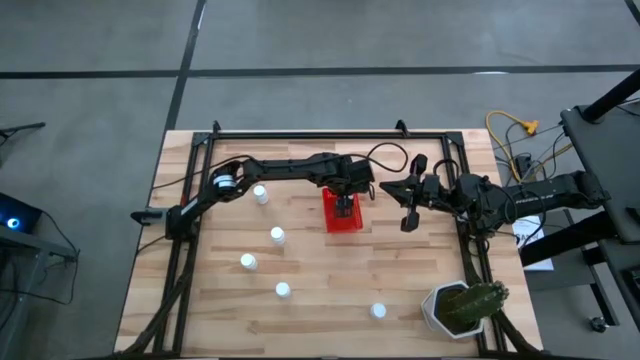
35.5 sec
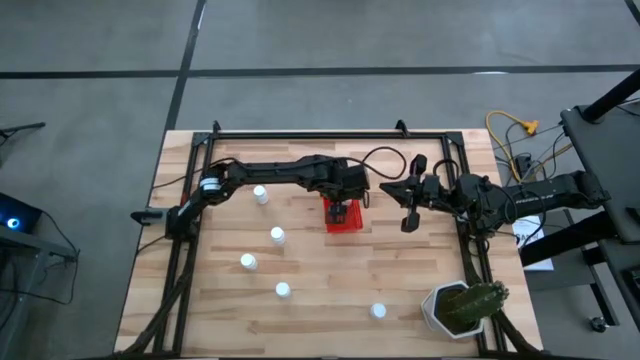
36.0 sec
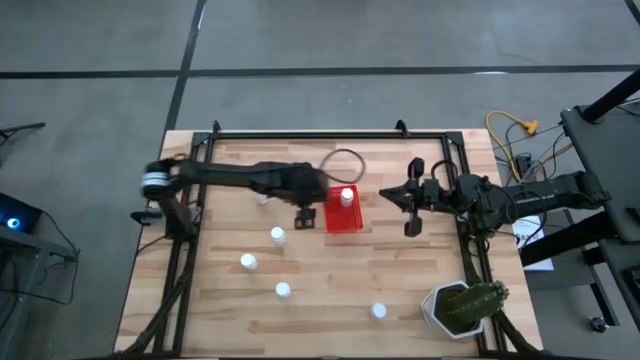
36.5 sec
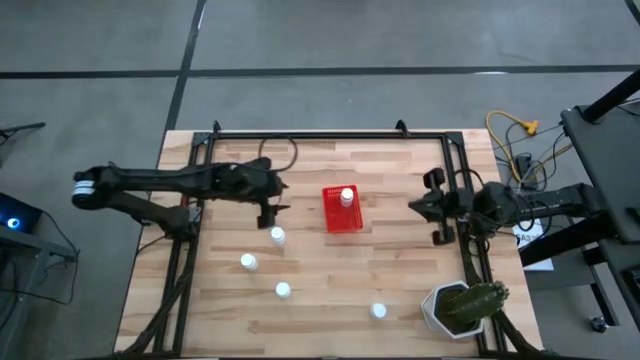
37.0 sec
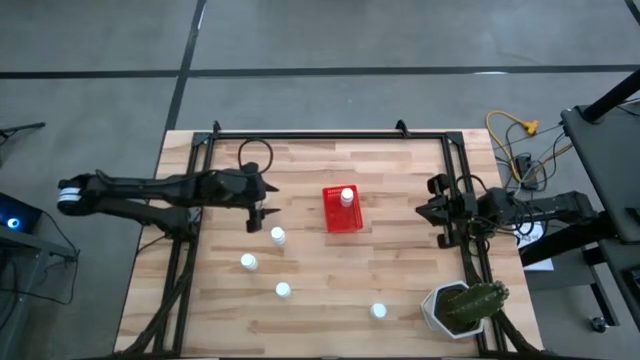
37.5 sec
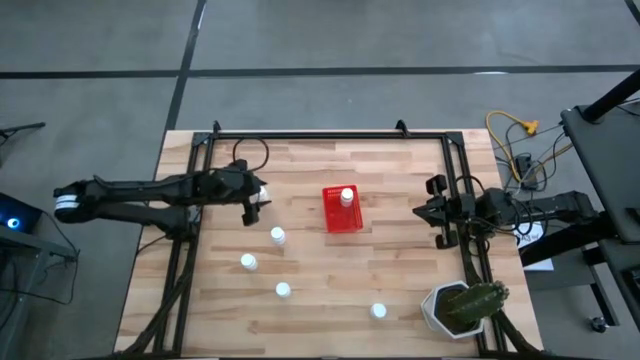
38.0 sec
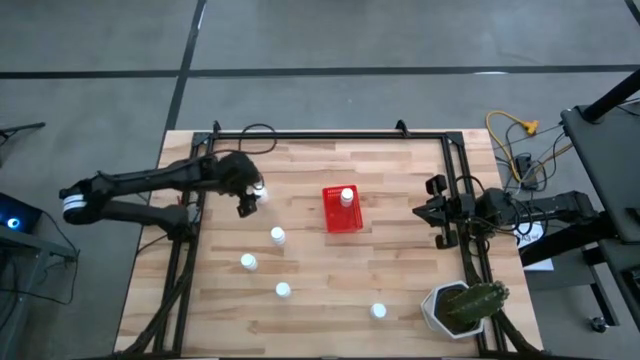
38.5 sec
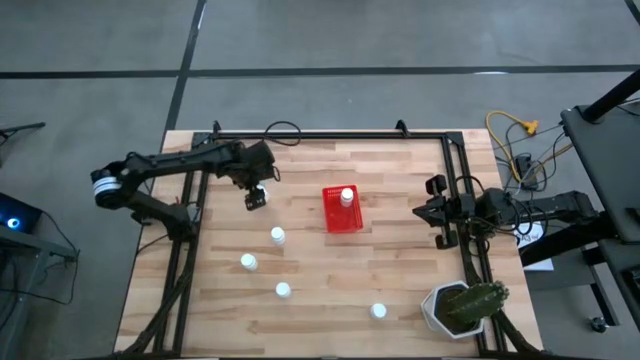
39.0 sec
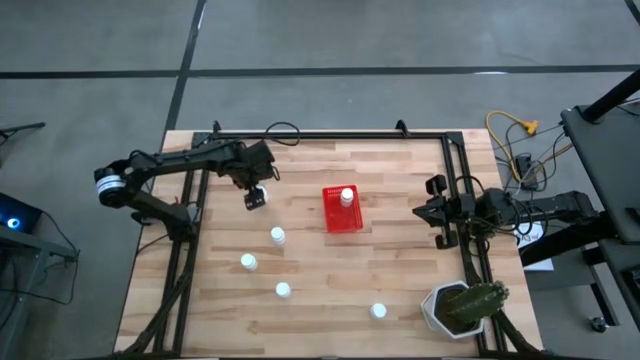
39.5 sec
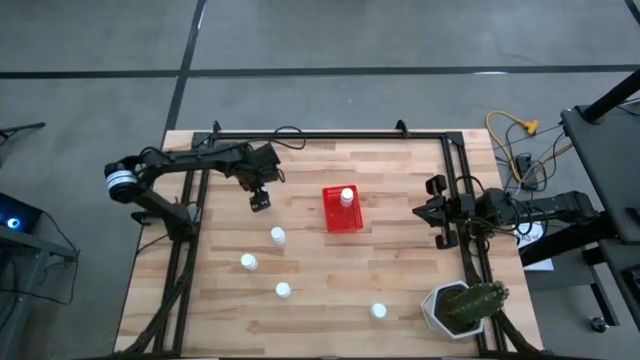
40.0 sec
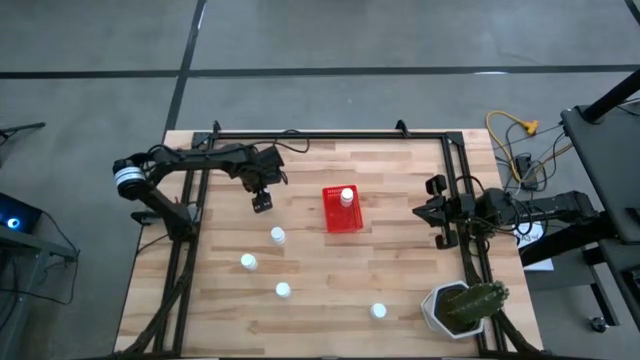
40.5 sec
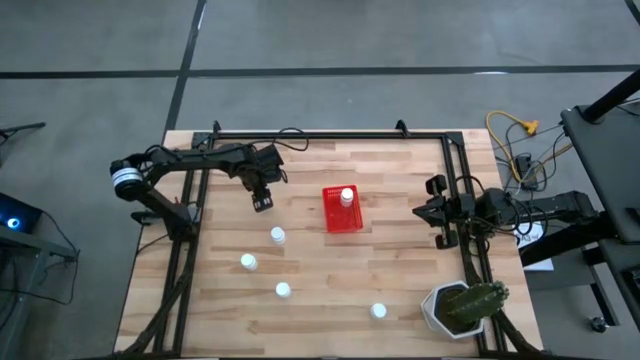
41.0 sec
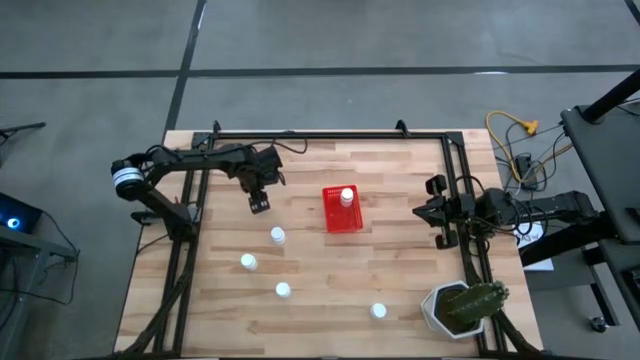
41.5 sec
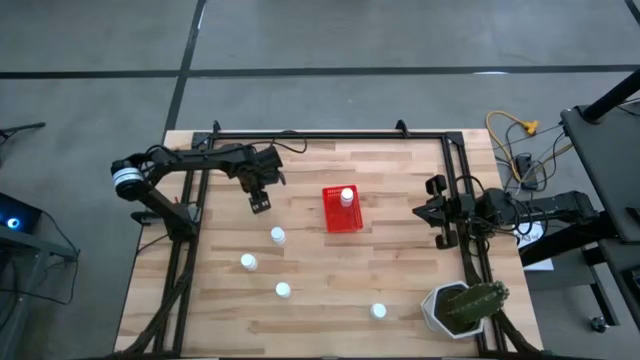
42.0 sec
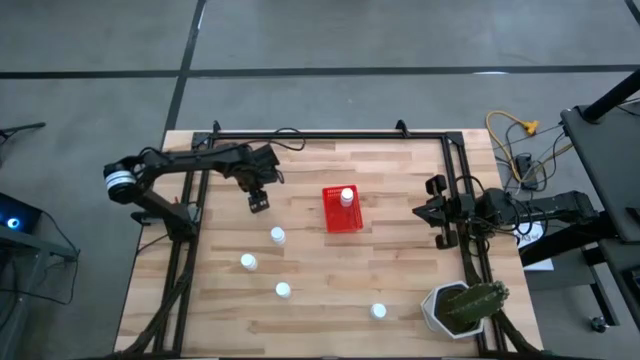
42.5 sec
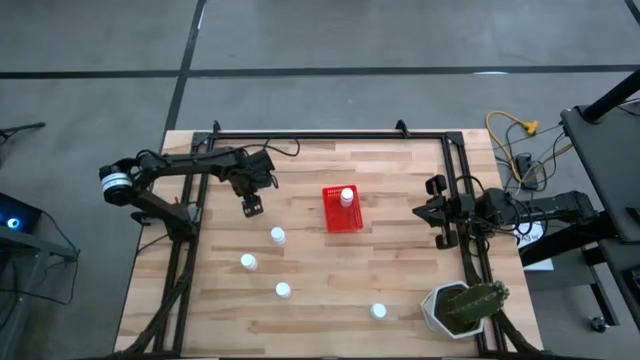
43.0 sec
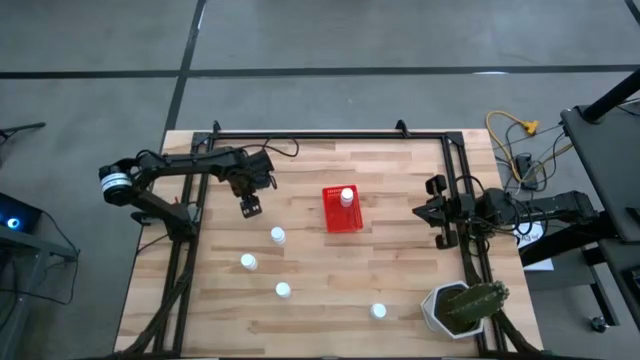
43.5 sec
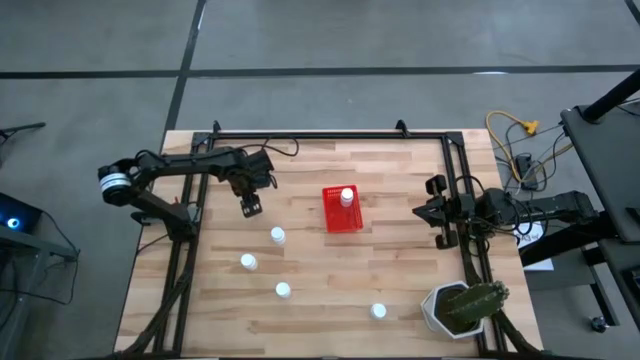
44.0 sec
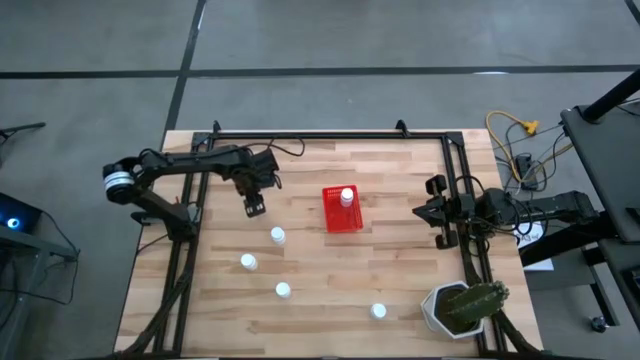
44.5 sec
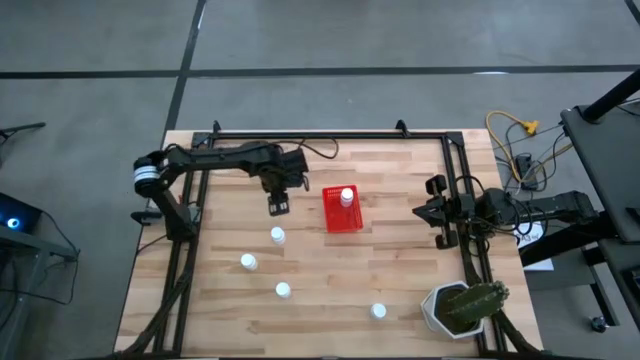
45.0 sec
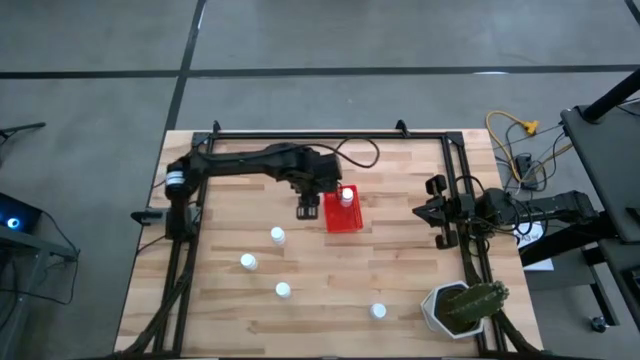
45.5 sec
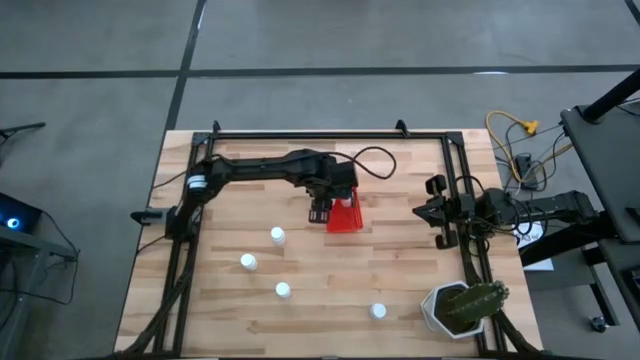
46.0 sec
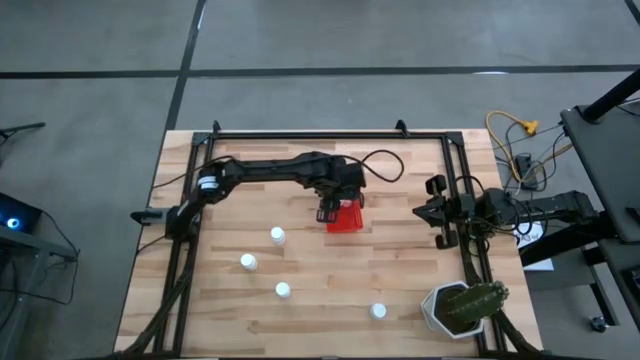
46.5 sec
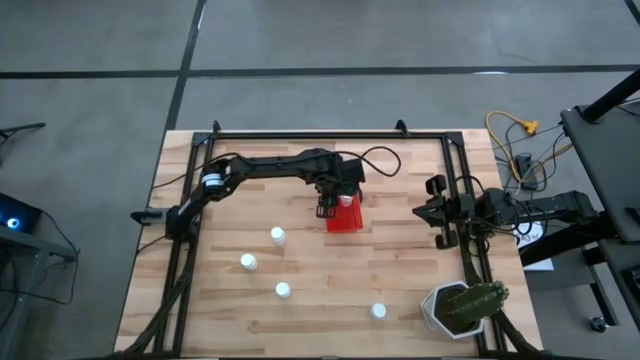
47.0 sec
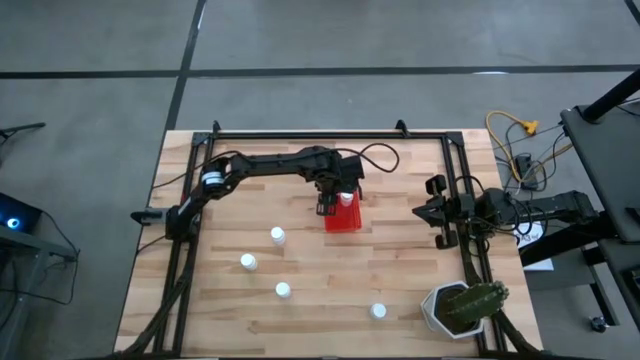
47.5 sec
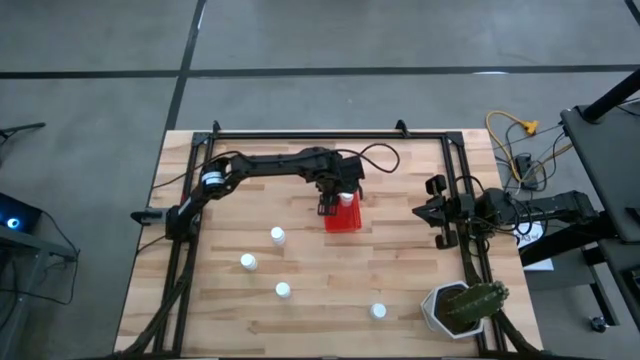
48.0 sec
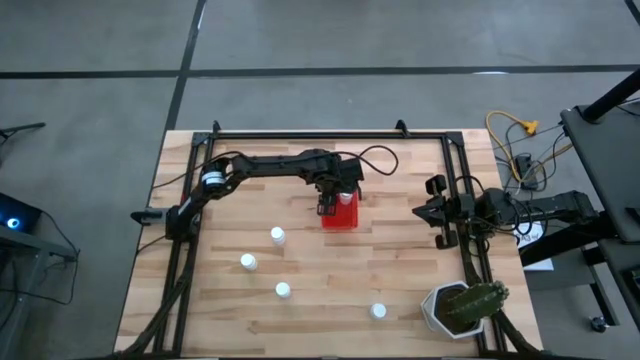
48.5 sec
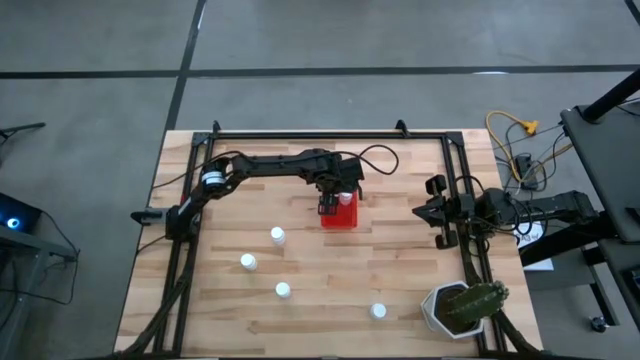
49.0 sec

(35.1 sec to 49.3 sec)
Task: Pick and place pill bottles into a basket
Put the top left white medicine bottle into the red bin

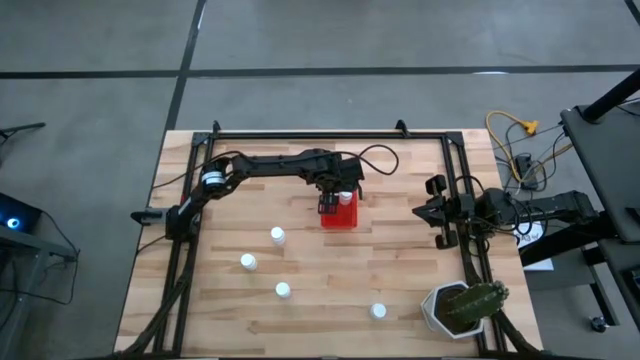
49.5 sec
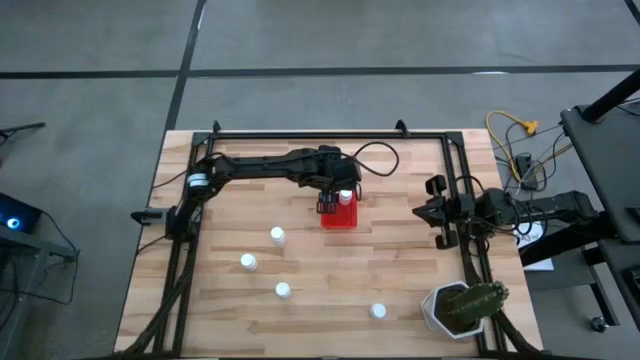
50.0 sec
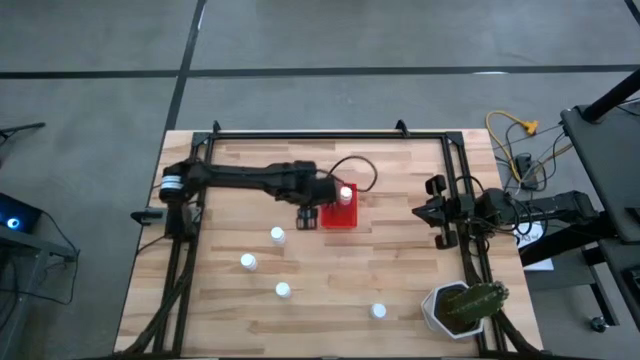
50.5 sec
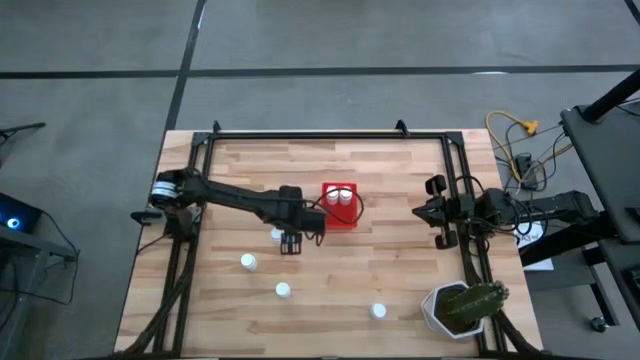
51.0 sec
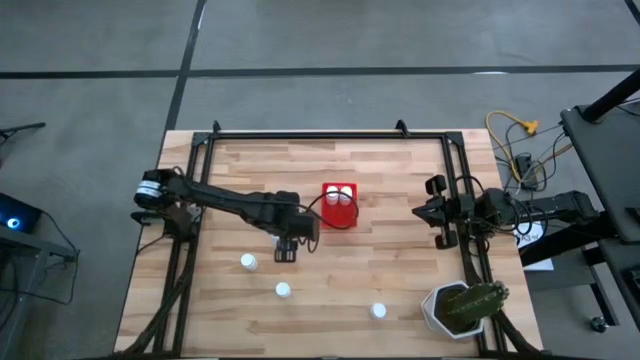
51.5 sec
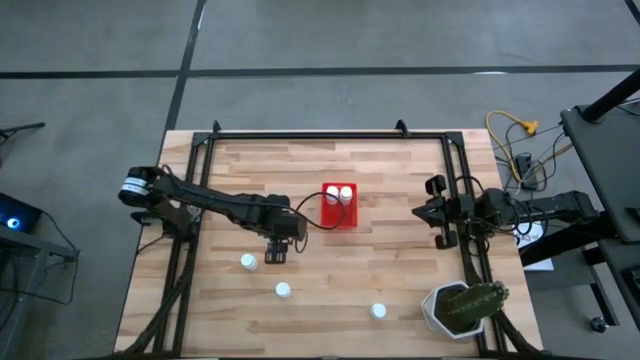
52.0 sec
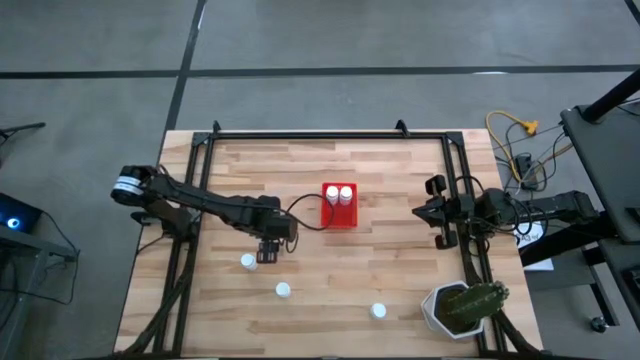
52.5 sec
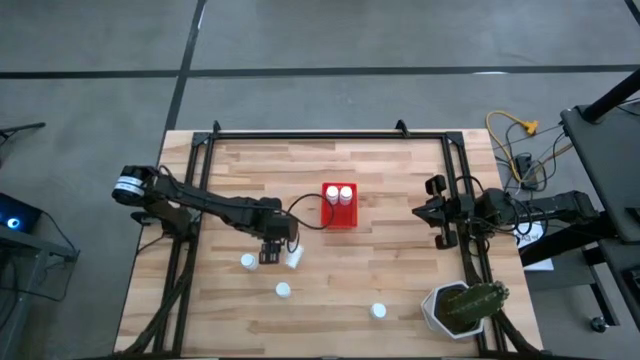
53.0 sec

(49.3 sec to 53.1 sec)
Put the top center white medicine bottle into the red bin

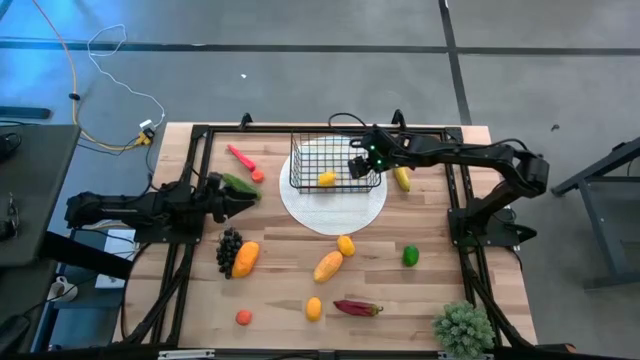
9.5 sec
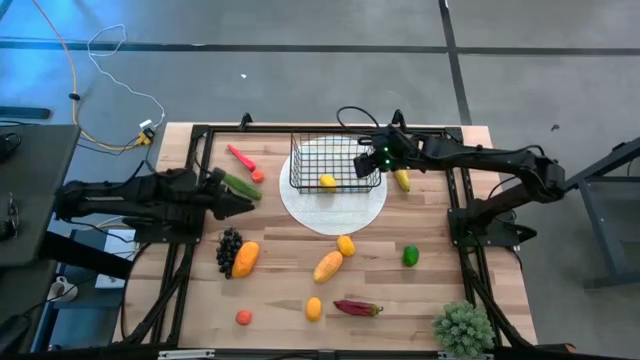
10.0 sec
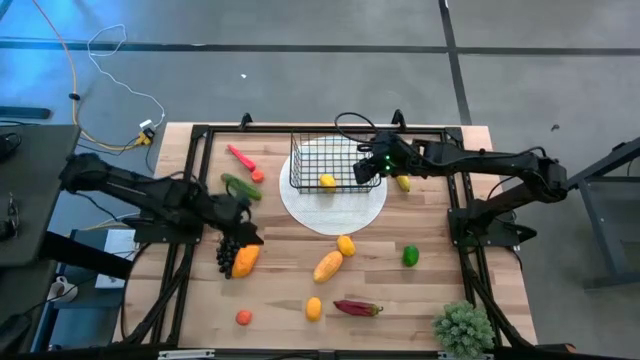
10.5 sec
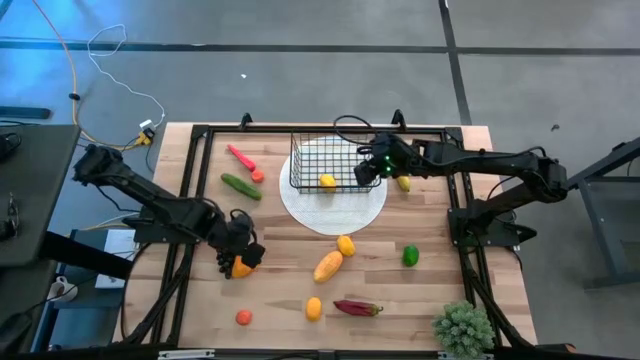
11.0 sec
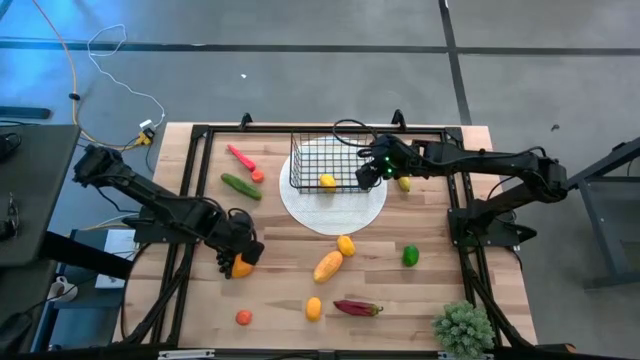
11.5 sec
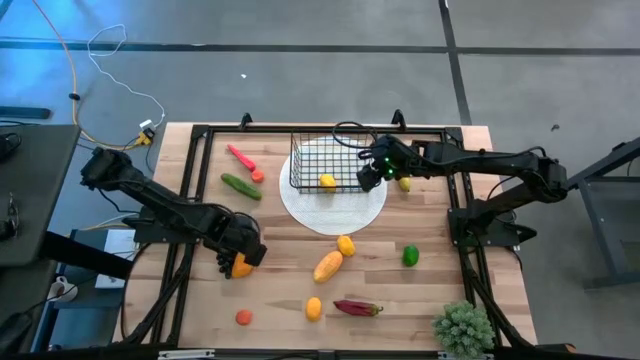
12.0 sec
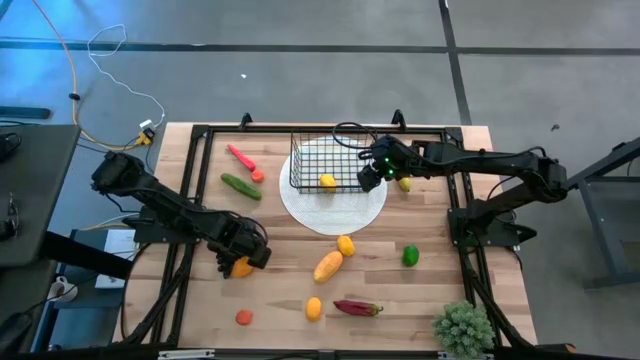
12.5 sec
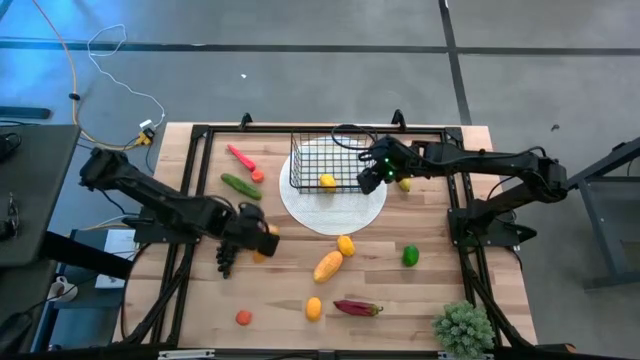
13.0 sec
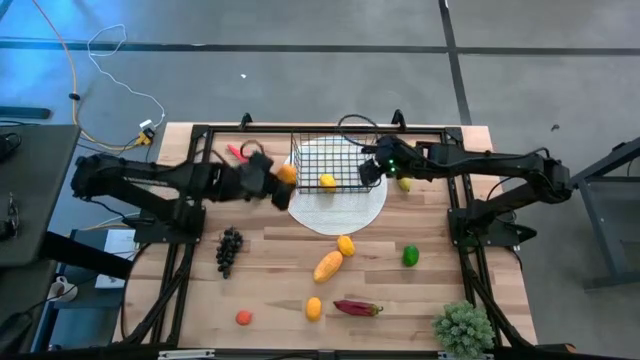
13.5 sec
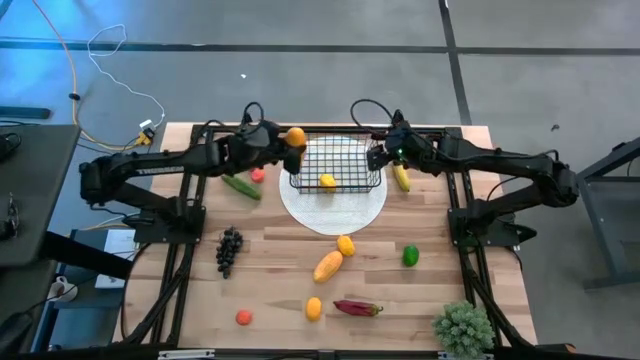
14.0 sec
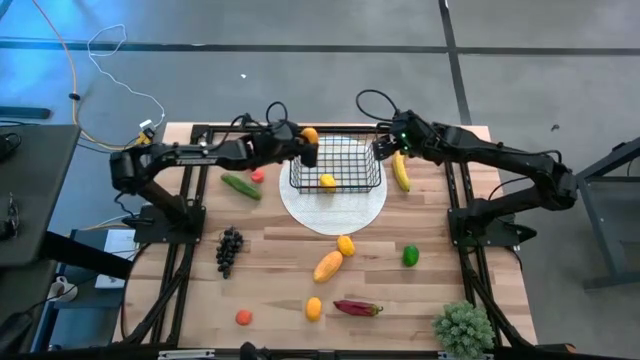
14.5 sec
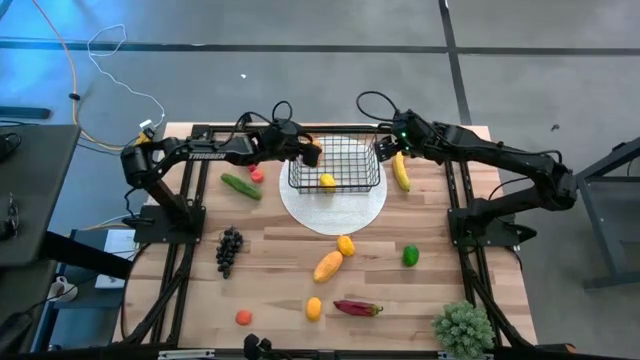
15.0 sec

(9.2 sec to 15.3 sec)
Task: Build produce basket
Put the left yellow mango into the black wire basket
